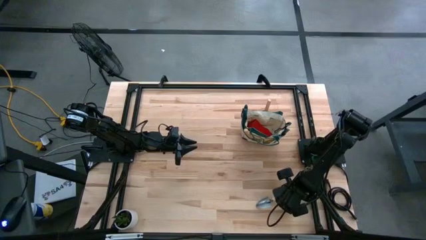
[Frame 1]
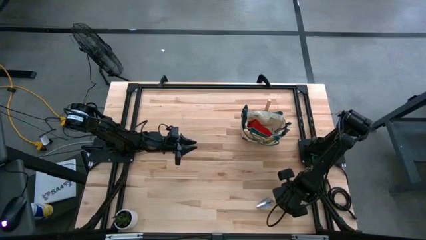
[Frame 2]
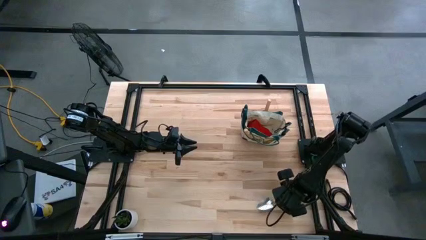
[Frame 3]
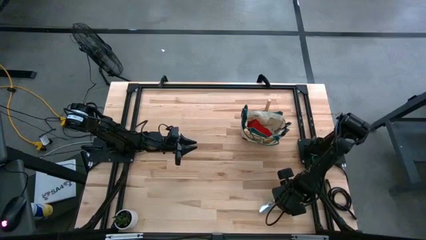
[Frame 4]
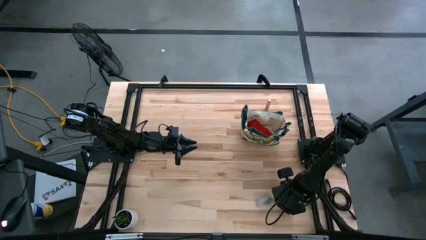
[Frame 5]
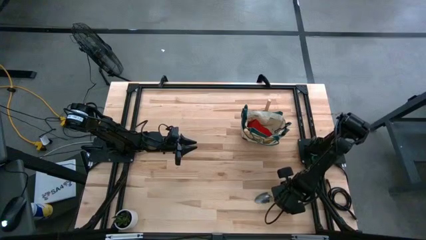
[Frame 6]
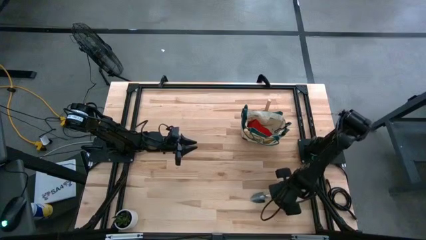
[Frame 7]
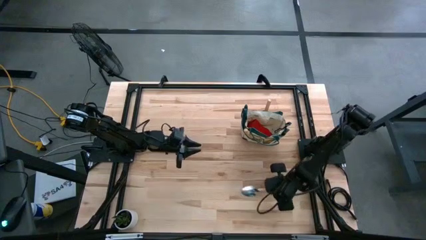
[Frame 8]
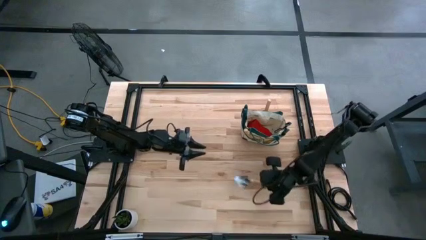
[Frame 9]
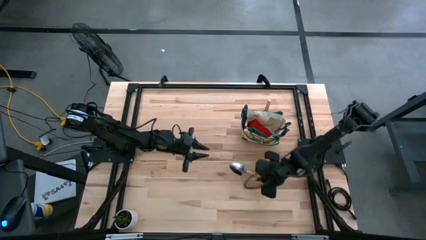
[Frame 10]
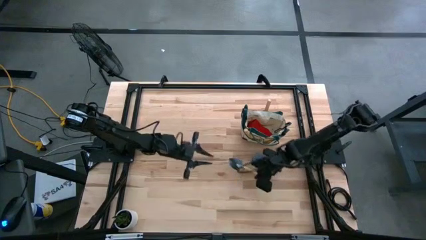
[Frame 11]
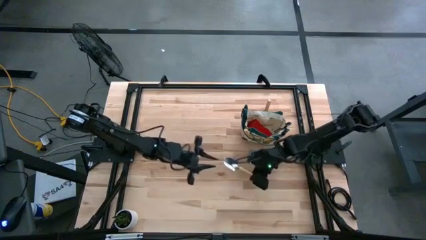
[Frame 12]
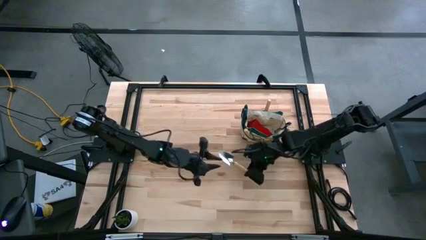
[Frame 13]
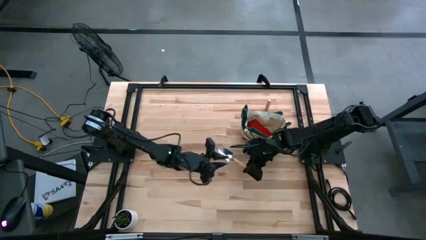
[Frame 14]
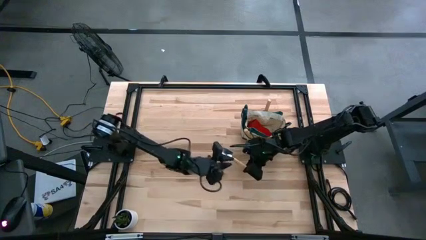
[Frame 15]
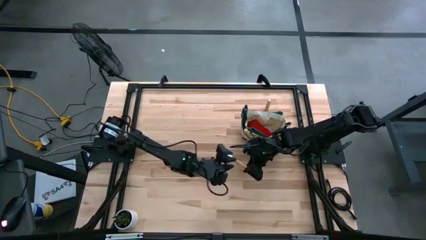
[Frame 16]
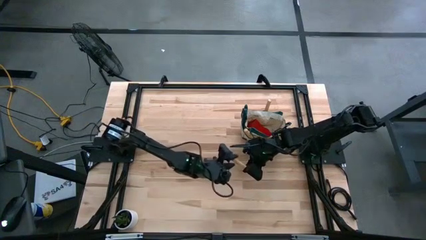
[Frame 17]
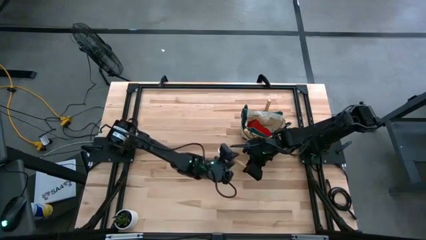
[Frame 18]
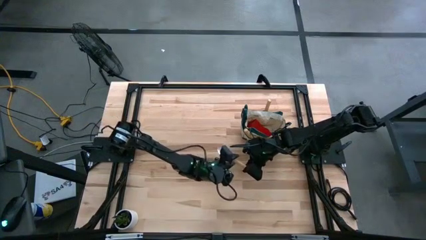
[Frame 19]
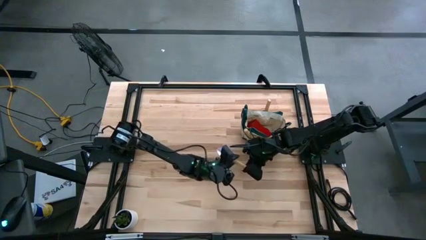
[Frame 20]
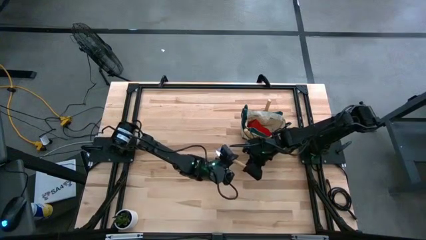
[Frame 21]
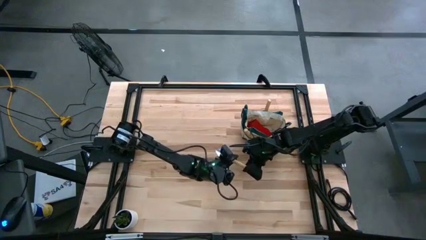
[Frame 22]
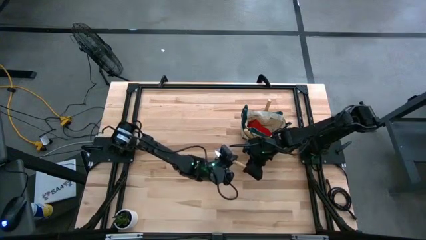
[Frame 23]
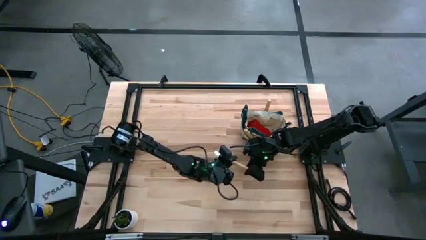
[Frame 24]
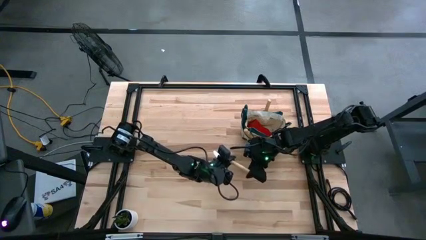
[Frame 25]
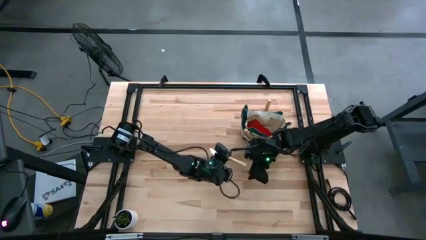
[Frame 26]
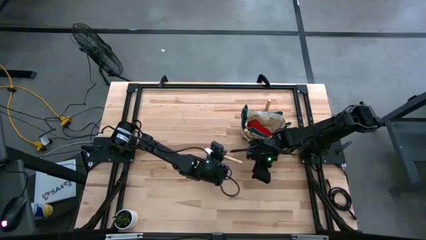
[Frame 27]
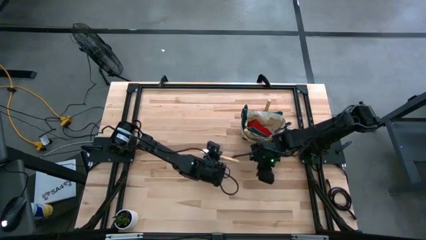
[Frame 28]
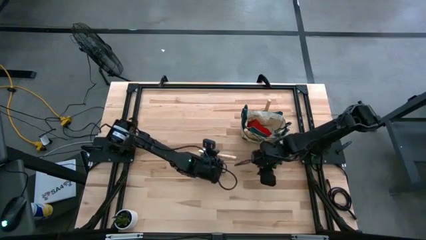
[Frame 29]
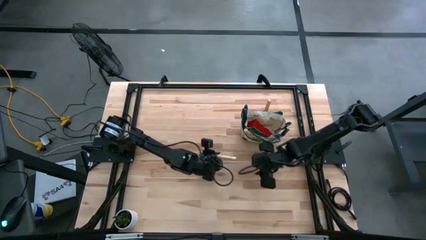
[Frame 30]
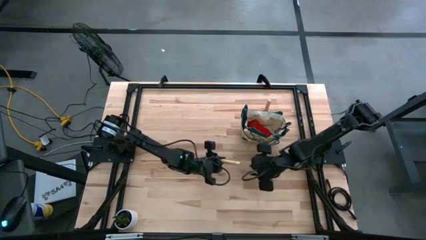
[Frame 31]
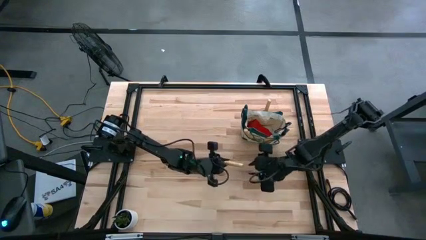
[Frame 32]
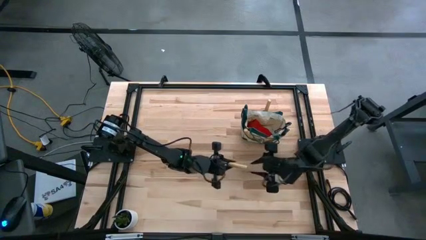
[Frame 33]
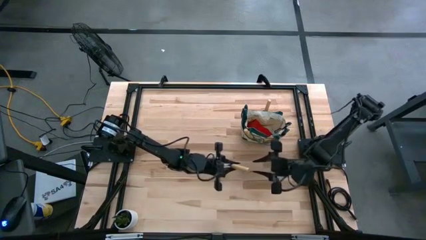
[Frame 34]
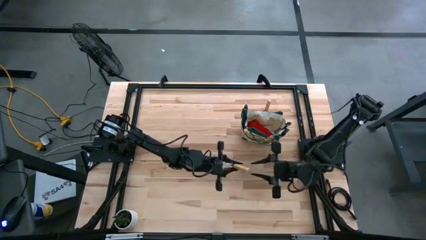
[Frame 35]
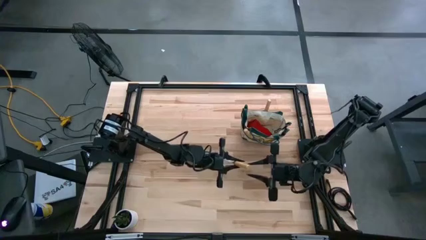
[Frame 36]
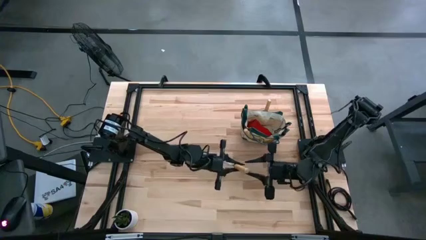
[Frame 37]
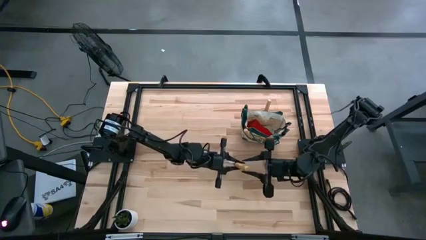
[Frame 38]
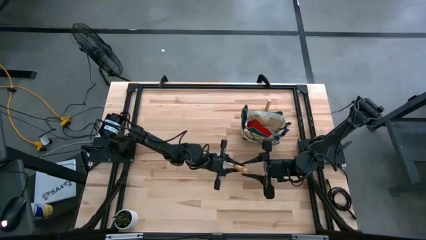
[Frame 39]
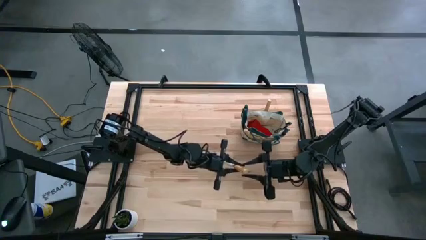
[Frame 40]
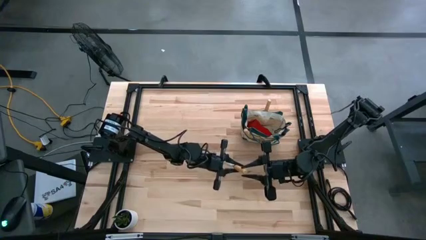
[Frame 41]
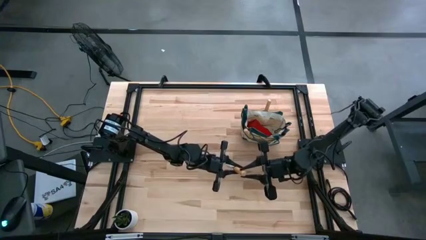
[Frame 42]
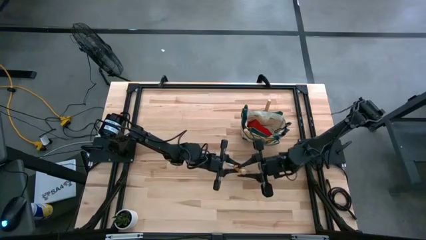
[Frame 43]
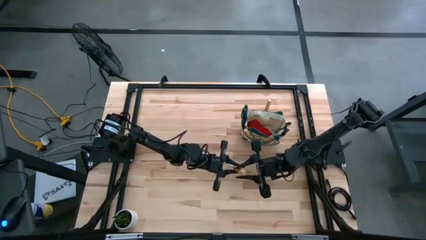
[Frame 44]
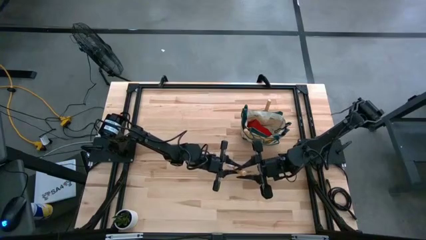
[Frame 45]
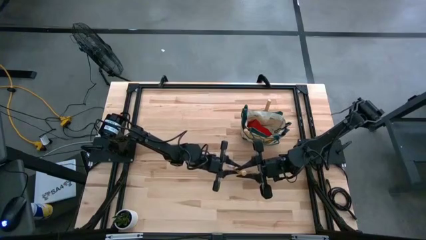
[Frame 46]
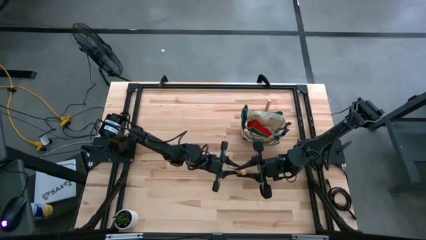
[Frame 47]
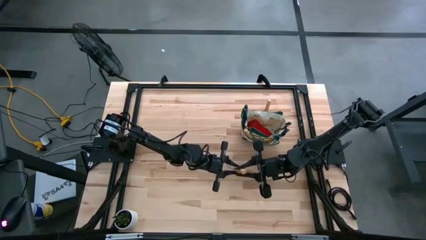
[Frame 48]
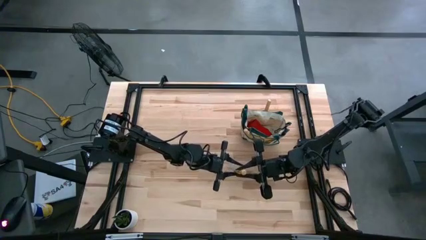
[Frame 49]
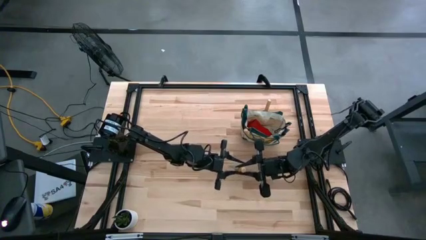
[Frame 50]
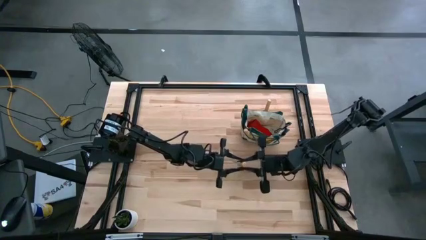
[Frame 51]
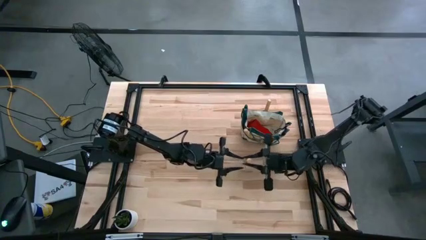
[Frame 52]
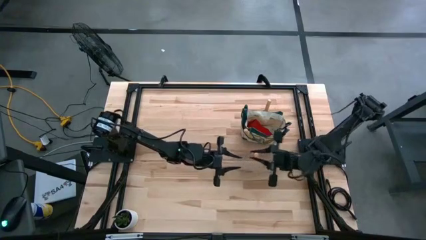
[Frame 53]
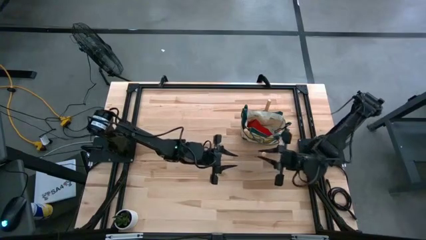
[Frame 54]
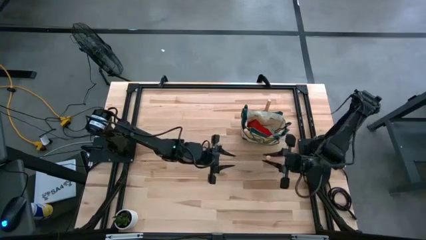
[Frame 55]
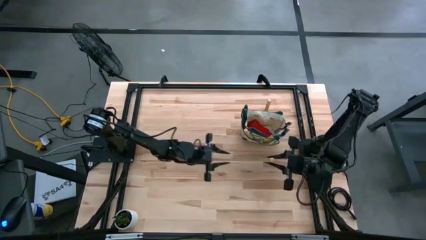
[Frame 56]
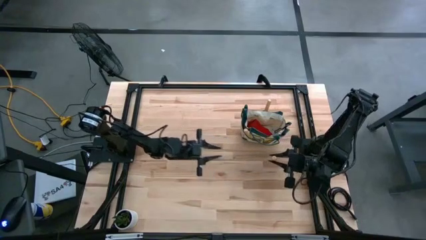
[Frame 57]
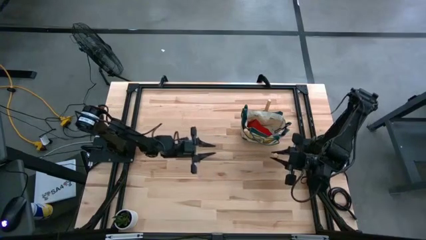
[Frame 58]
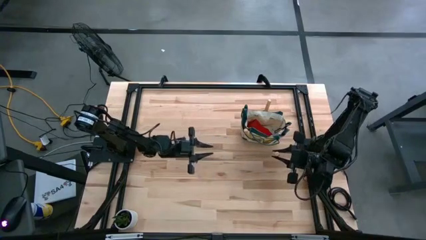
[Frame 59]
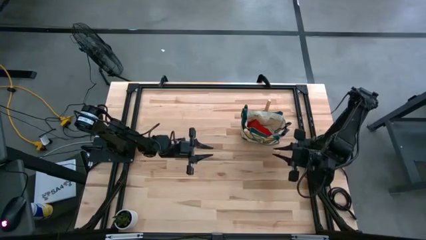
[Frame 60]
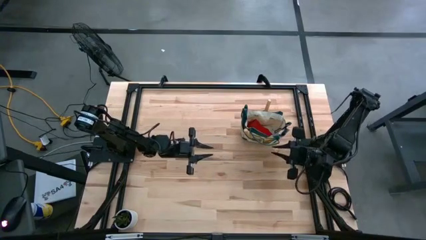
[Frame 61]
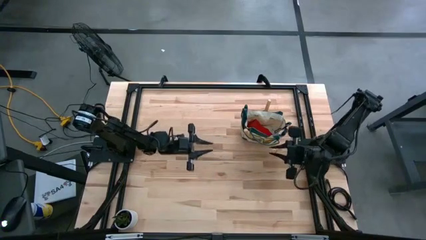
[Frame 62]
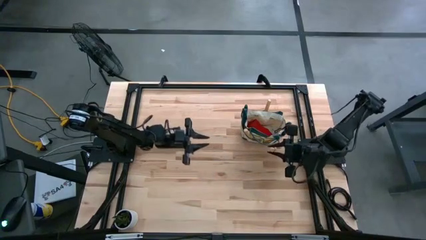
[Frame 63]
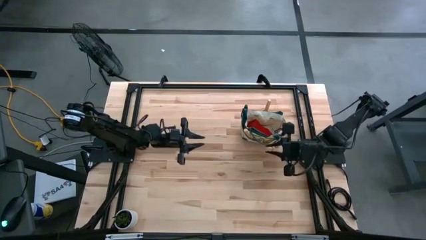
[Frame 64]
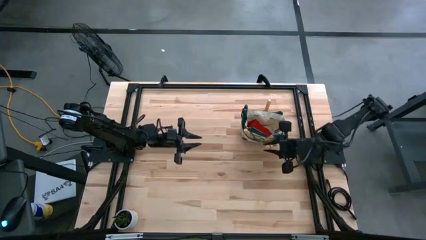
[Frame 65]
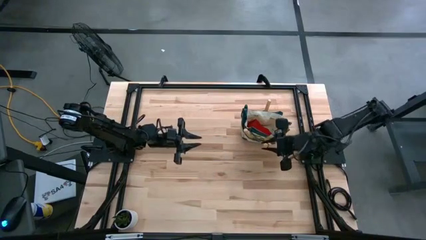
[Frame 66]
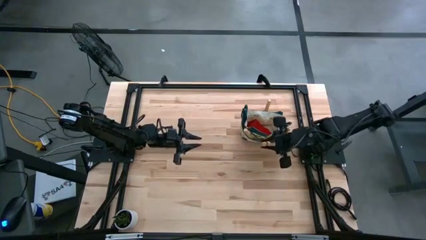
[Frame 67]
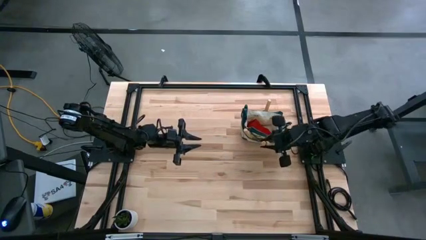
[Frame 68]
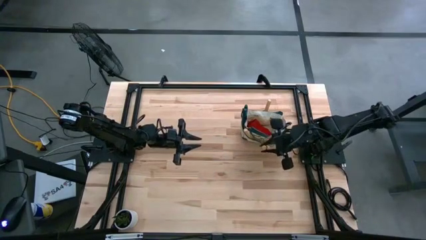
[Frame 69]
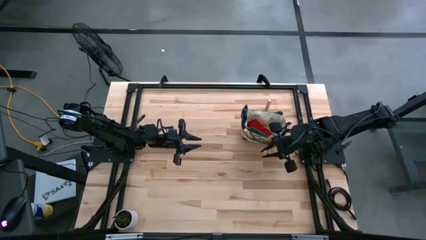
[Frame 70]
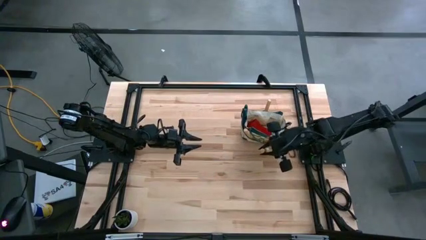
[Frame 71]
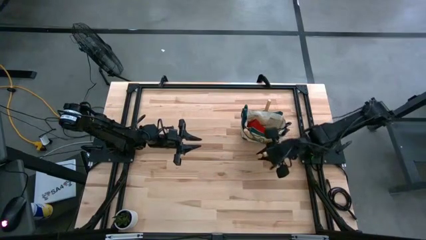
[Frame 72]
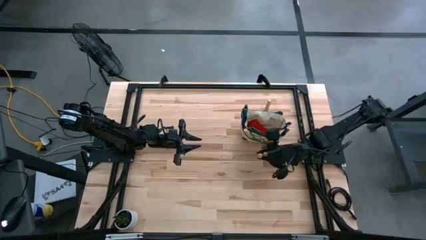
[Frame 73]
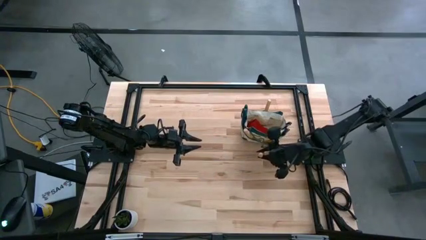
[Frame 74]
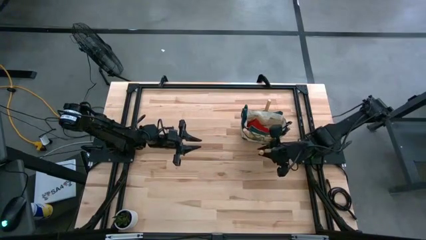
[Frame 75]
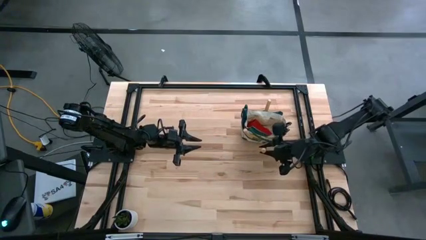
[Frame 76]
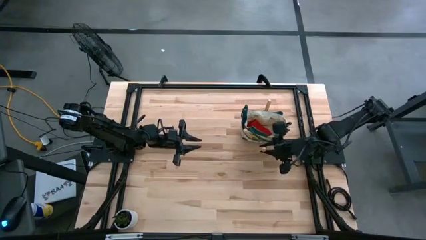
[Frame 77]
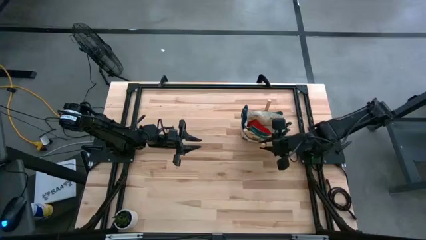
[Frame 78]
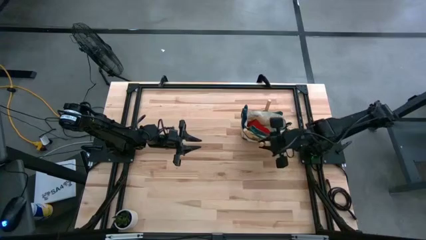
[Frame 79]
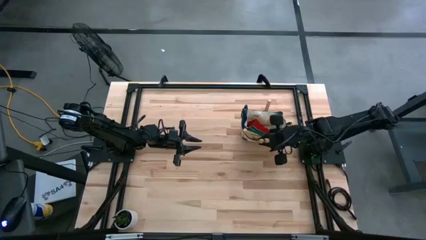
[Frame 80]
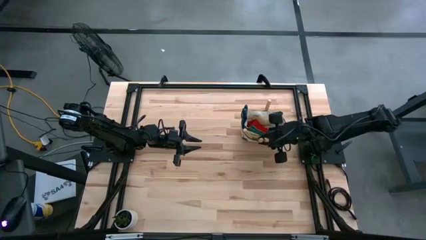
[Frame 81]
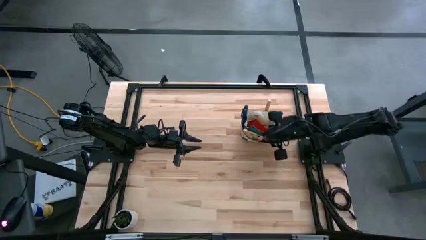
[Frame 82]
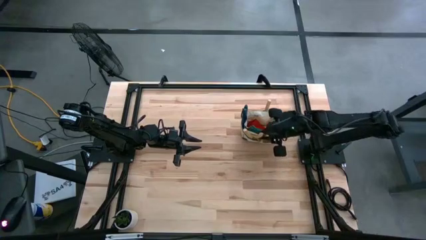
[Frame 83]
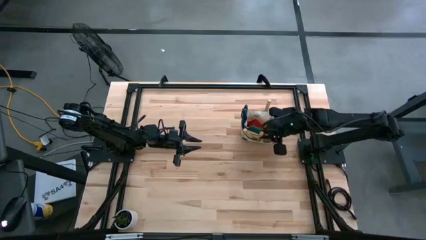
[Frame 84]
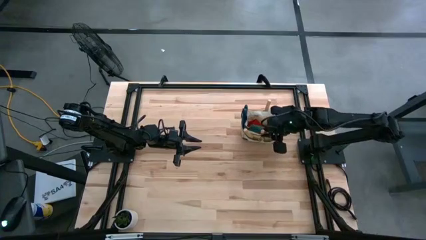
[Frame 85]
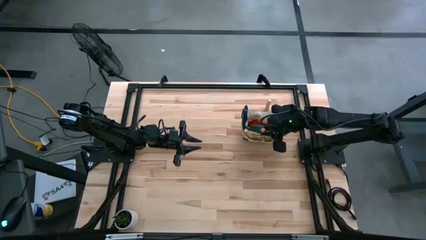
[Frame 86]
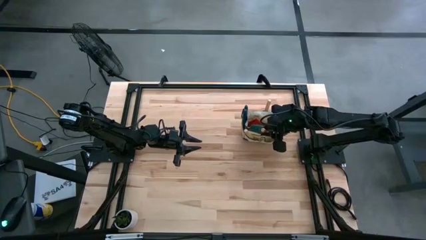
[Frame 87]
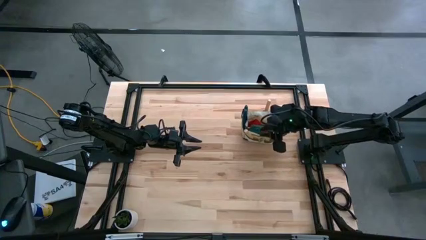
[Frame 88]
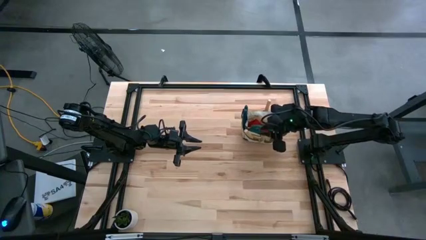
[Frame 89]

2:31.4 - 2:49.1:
Task: Pick & Place Garden tools in Gardening bag
Put the trowel into the gardening bag
